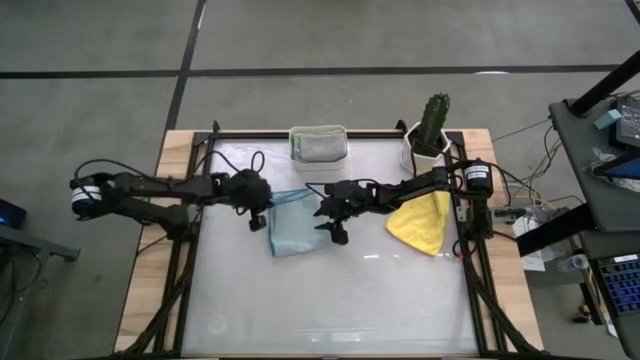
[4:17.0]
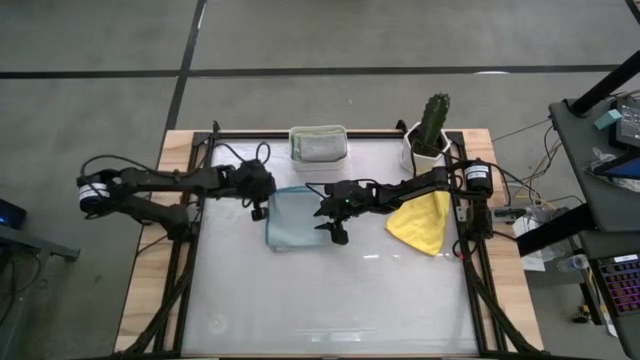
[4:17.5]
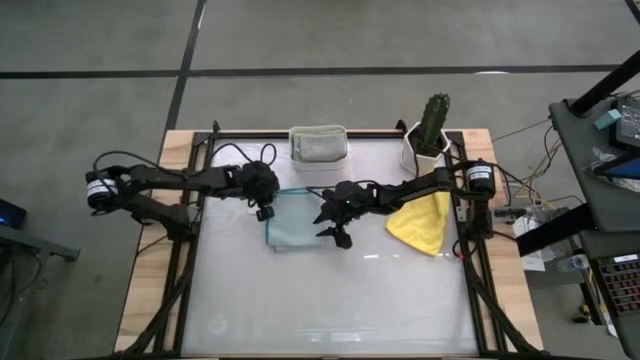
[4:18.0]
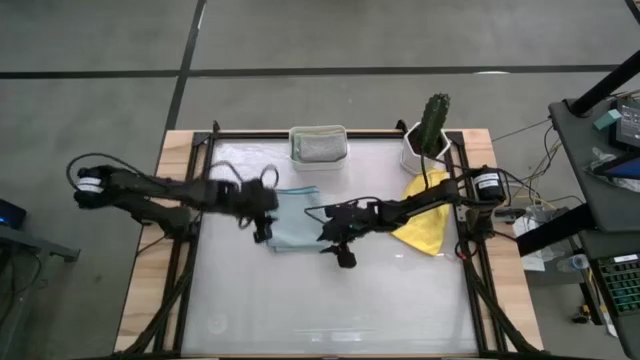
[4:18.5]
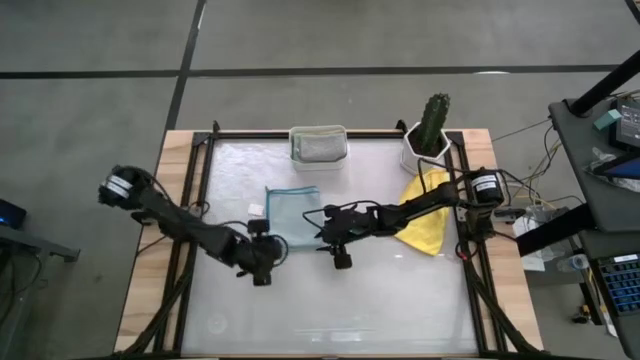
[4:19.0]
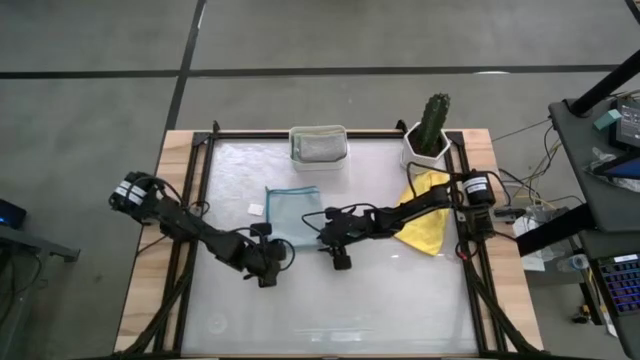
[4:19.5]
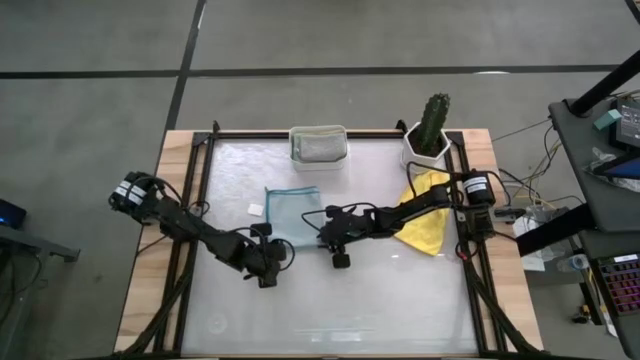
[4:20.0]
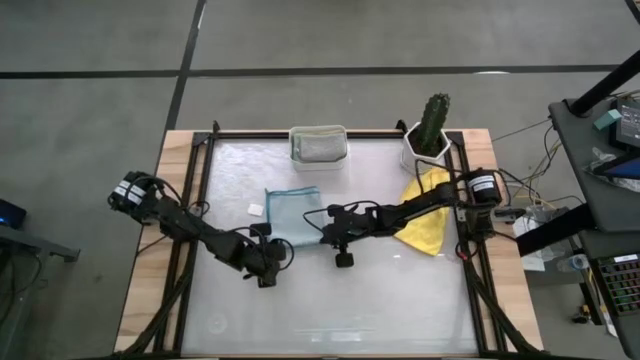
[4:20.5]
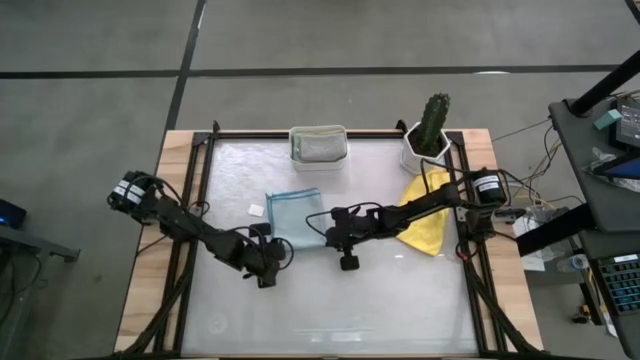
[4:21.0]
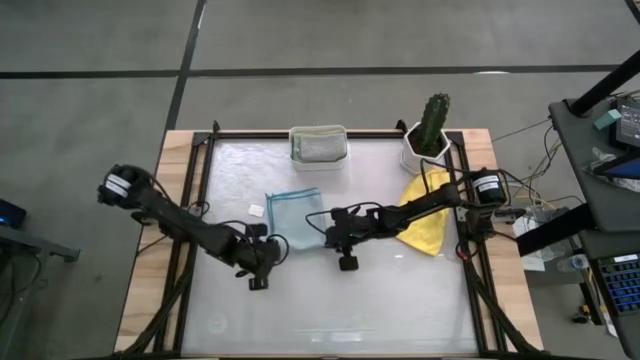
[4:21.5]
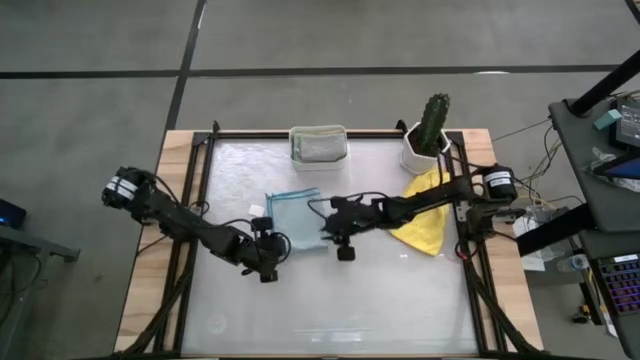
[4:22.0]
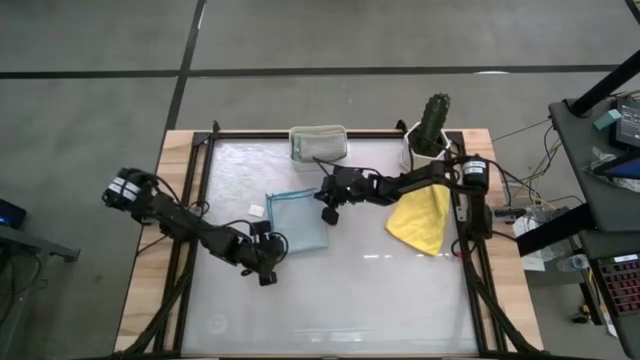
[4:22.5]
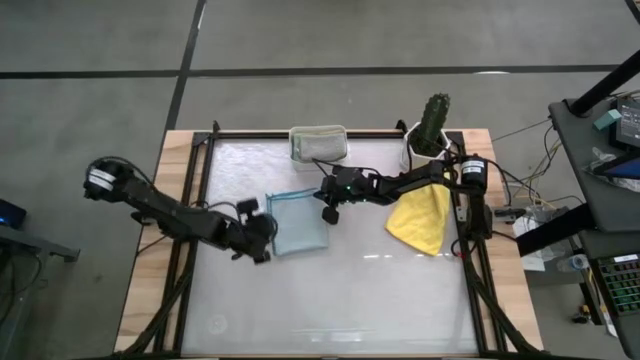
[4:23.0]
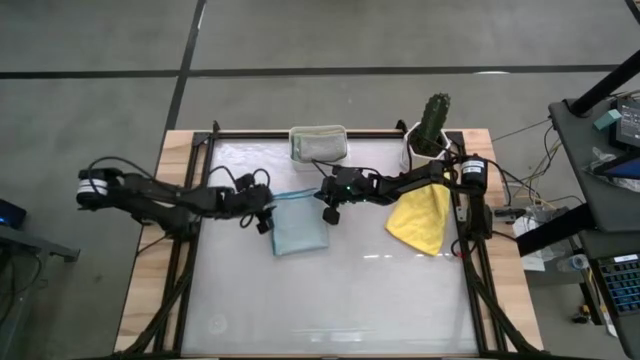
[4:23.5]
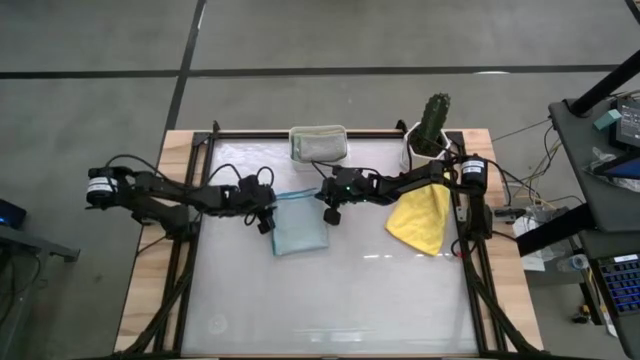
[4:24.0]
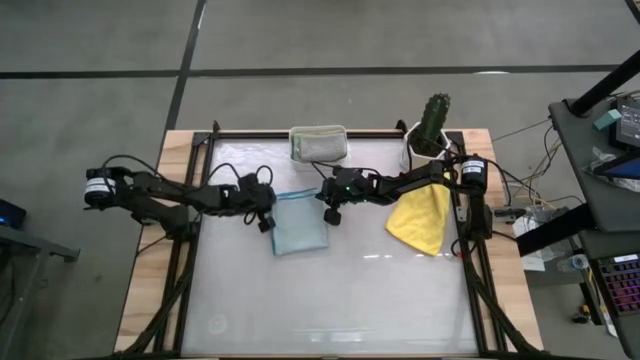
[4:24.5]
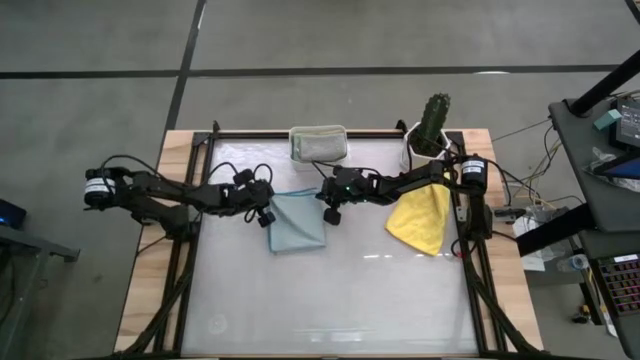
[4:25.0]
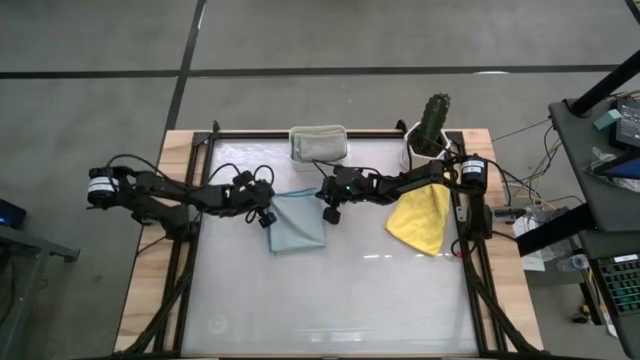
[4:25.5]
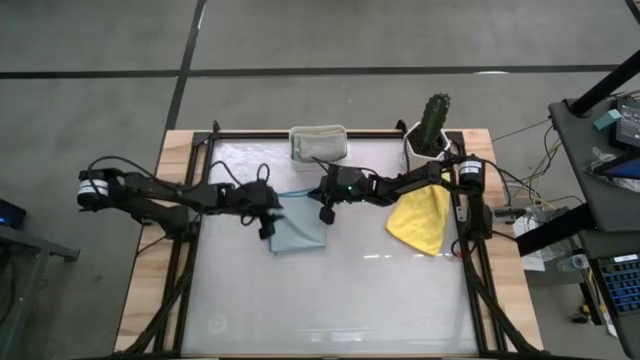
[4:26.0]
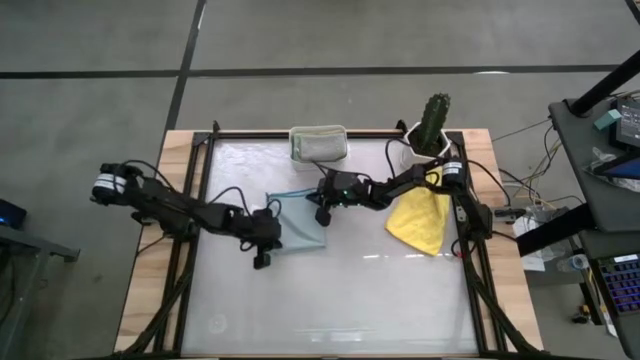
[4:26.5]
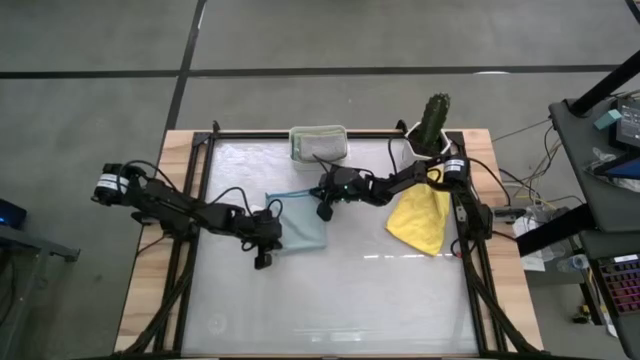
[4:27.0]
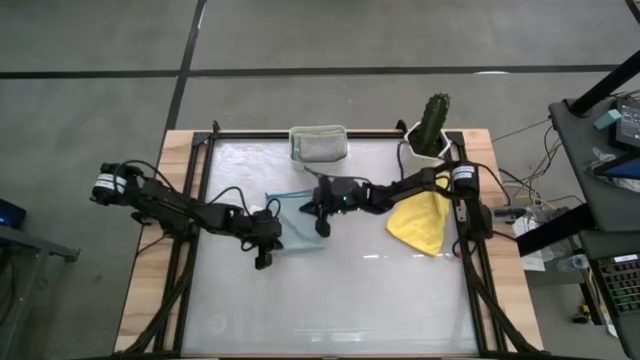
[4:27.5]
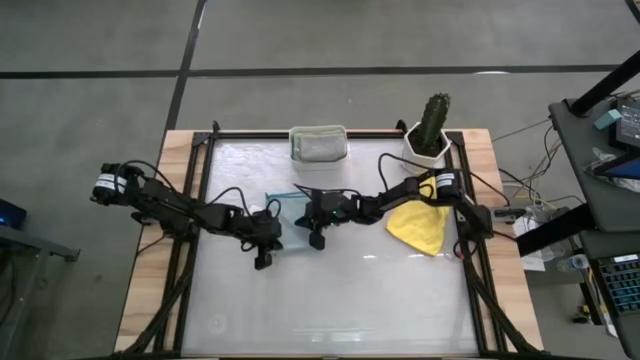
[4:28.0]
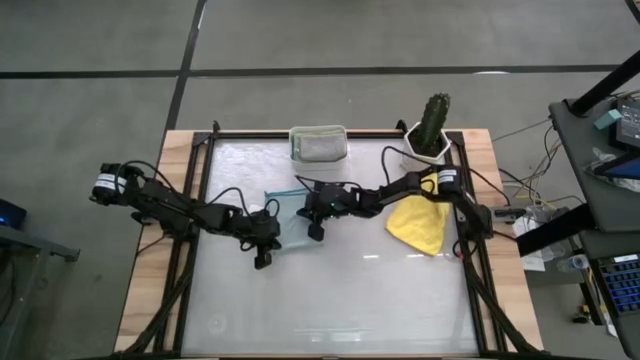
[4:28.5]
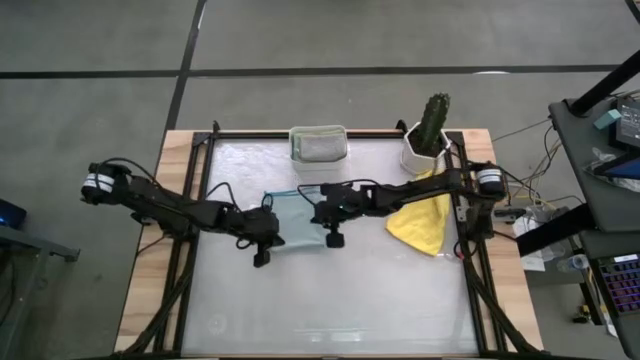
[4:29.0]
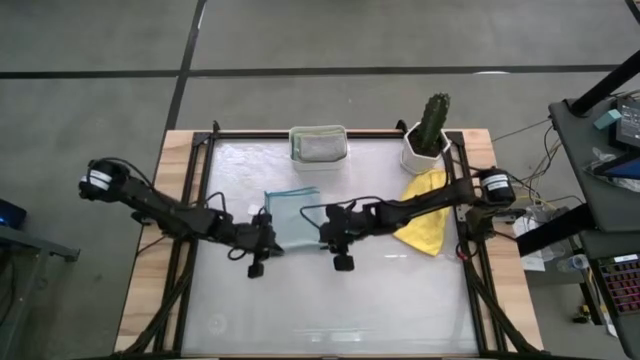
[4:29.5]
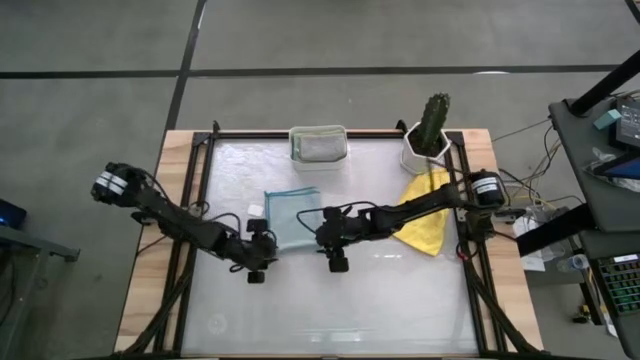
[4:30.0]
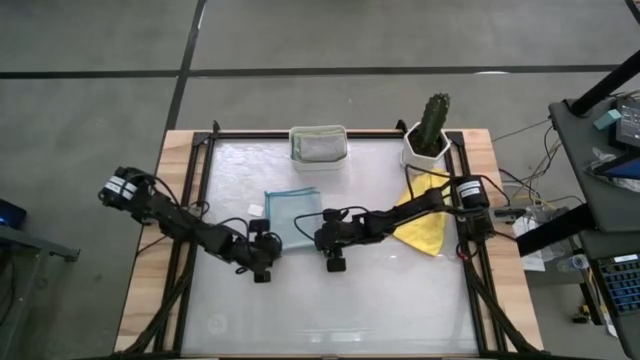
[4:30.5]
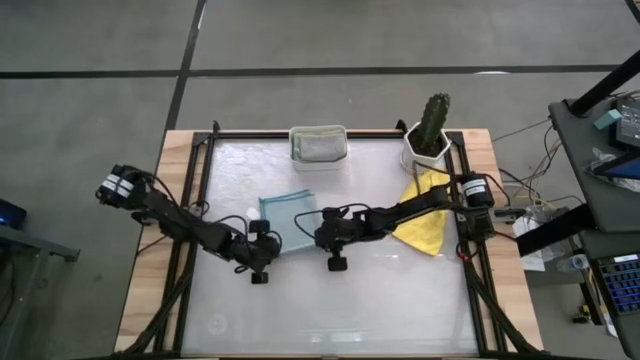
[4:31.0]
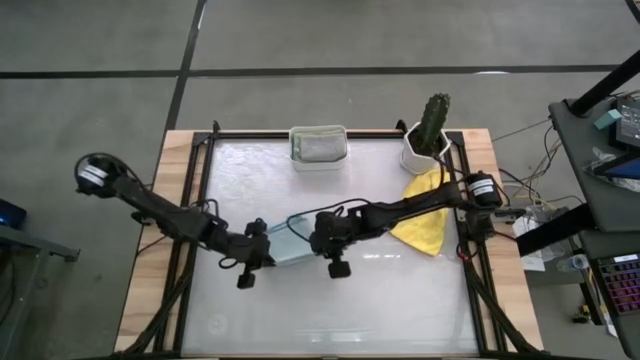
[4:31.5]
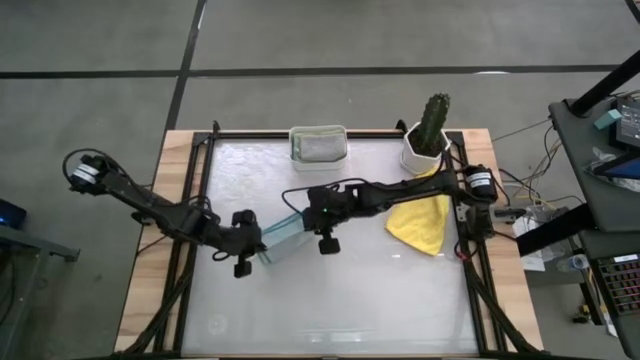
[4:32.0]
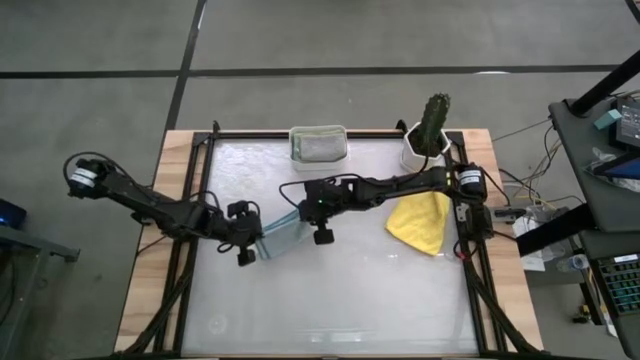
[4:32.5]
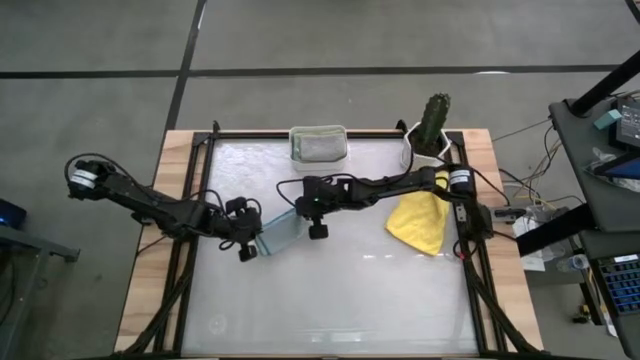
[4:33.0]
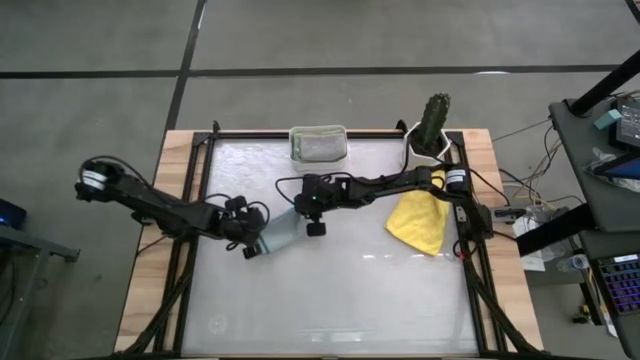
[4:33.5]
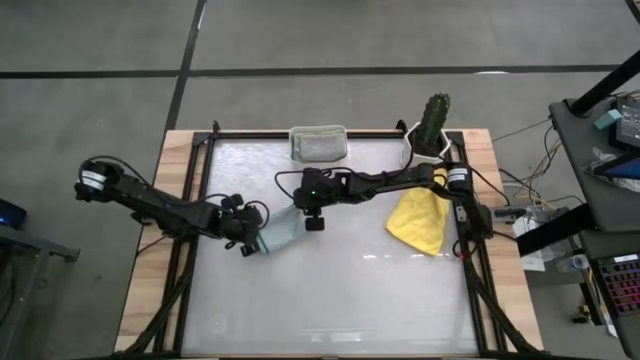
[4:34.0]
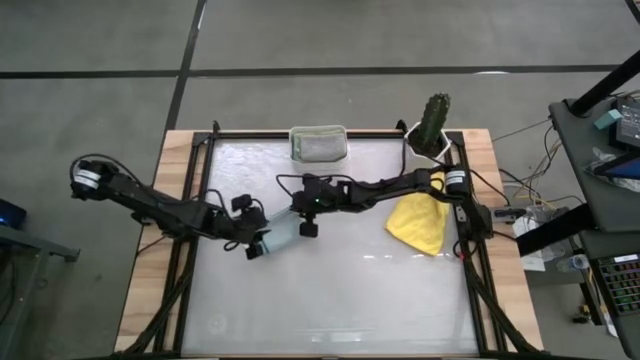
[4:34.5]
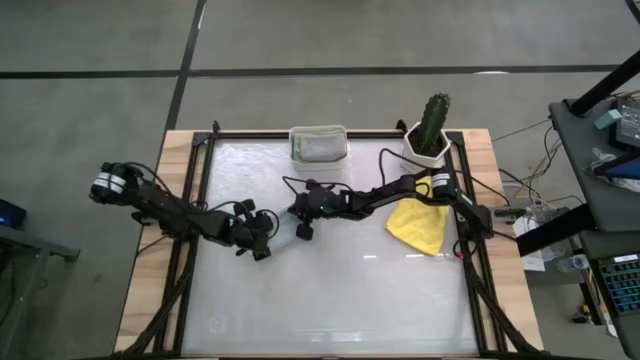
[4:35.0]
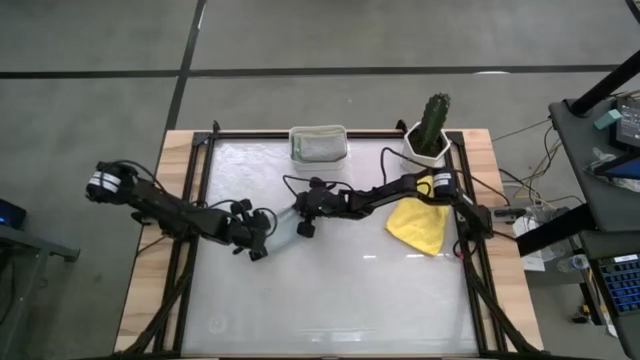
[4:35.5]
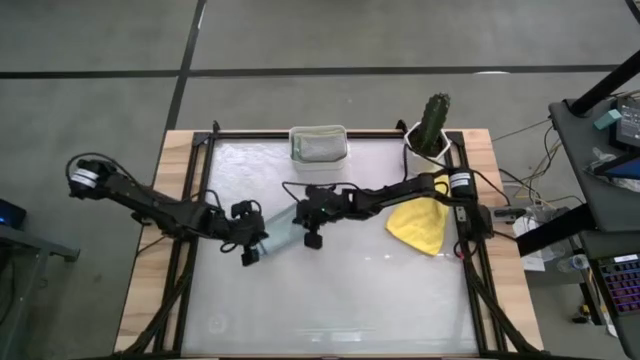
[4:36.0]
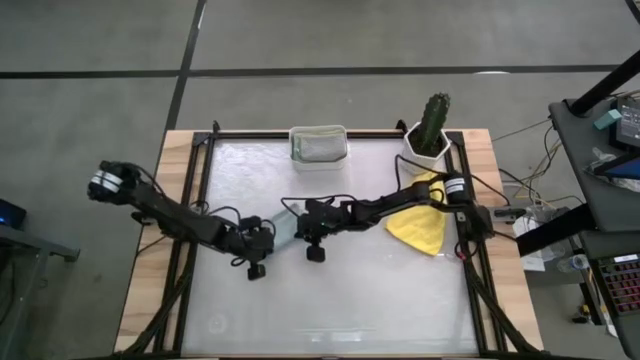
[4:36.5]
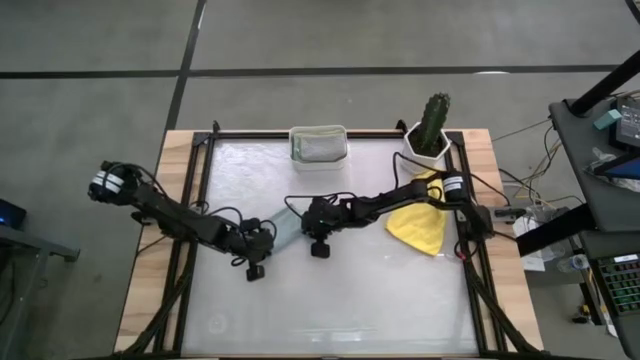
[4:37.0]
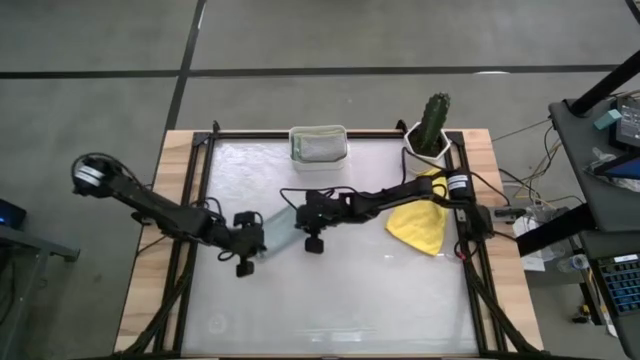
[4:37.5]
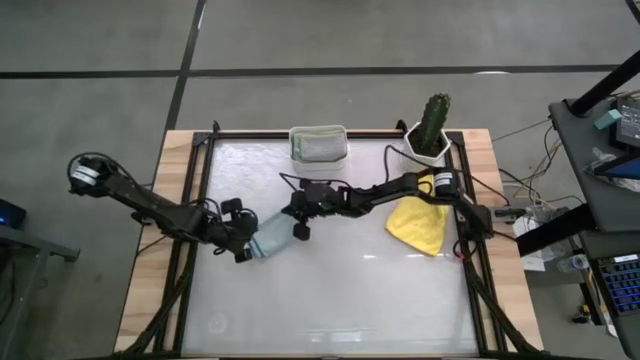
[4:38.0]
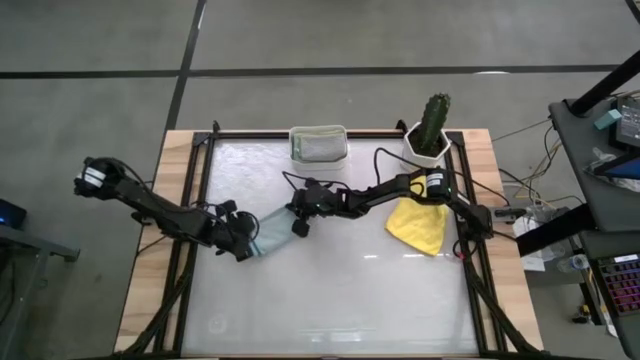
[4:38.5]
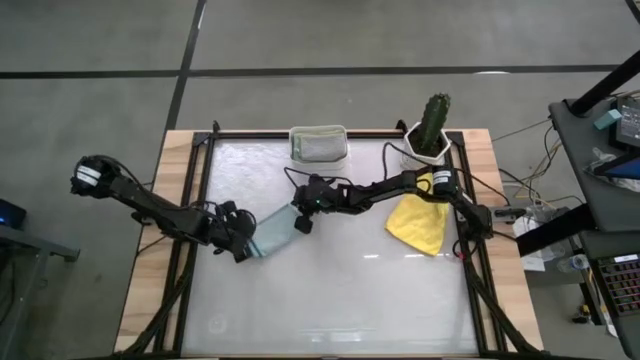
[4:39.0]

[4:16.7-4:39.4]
Task: Fold microfiber towels
Fold the light blue cloth
